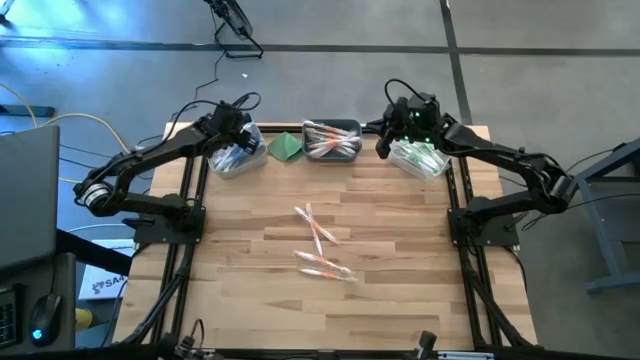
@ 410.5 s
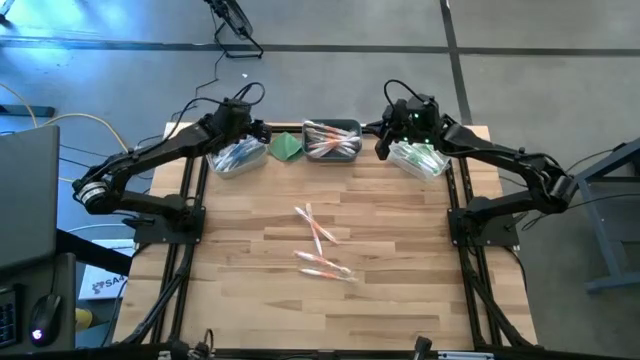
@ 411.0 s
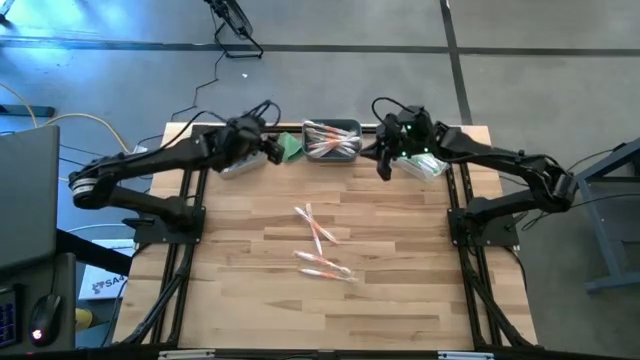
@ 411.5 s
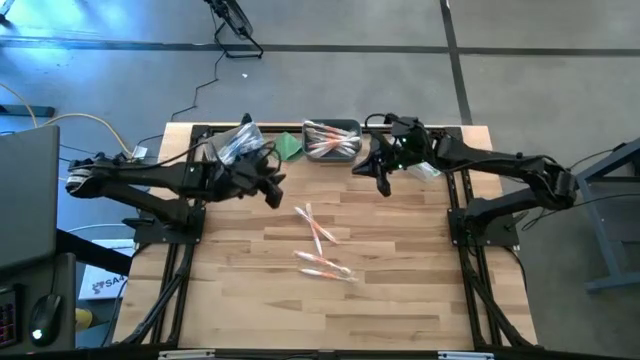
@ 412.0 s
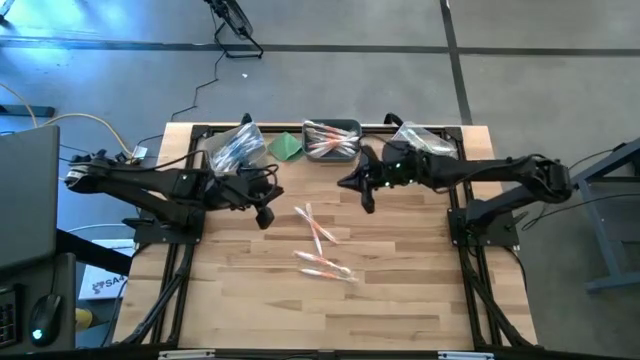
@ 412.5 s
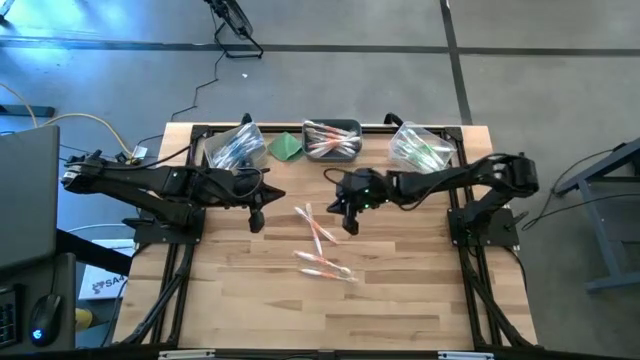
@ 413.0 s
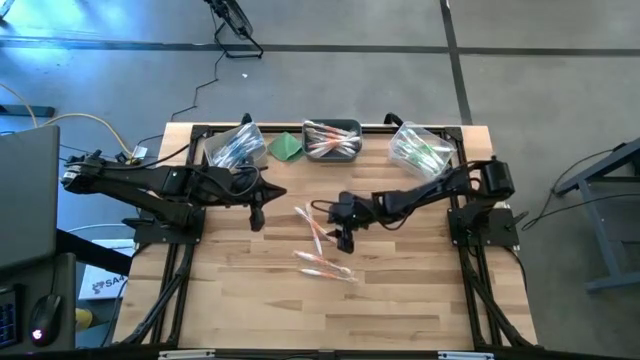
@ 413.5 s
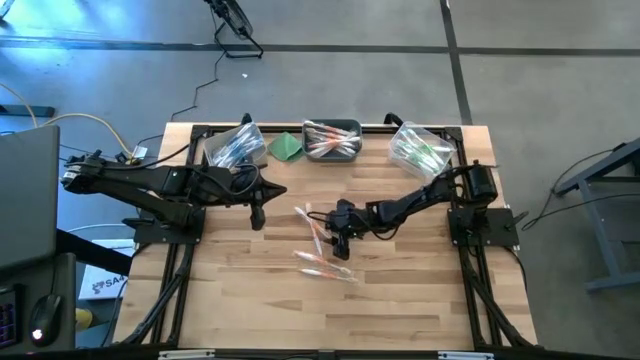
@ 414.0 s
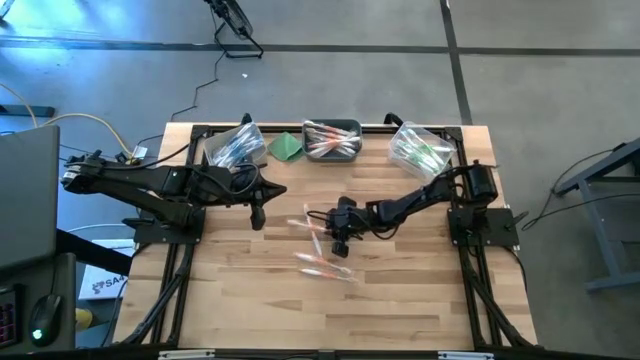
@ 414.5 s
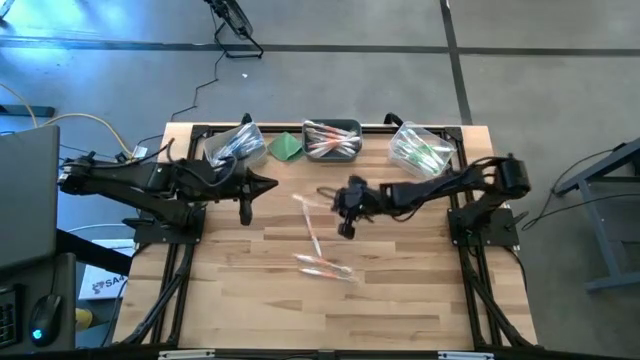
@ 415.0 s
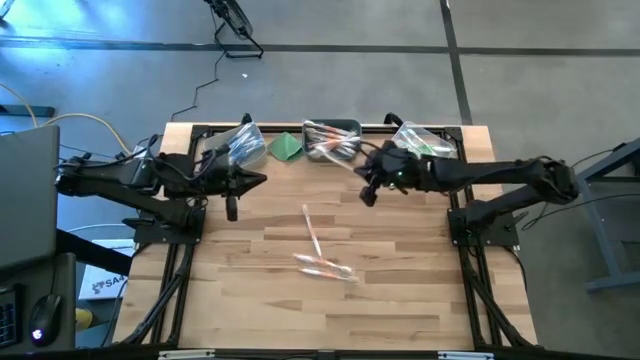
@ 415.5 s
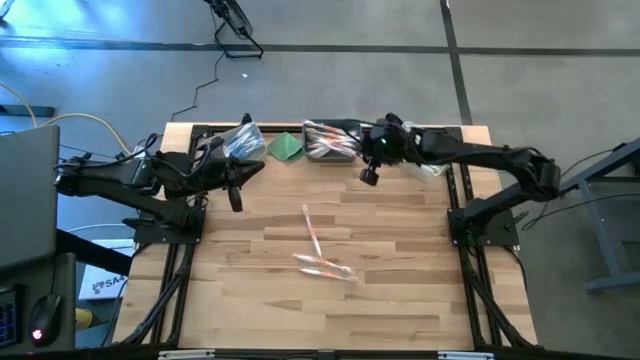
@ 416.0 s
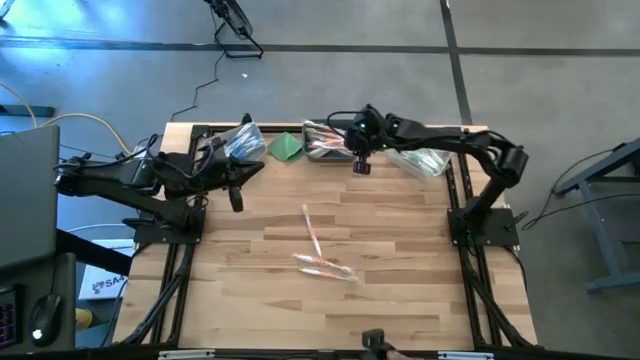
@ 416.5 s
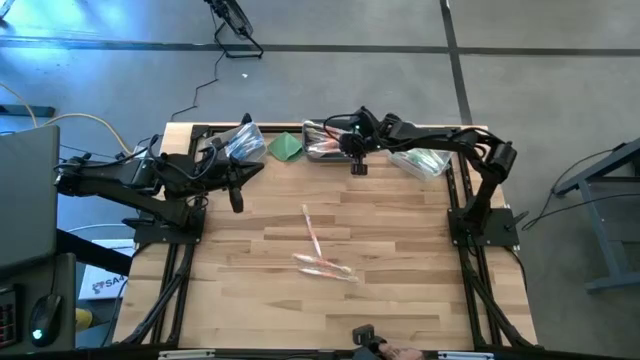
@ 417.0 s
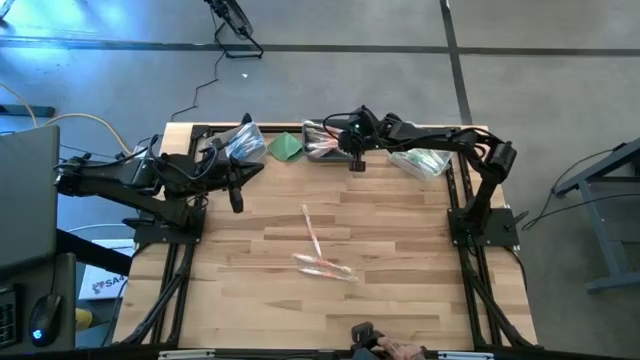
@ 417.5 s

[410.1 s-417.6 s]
Task: Pick & Place Toothbrushes
Put the orange toothbrush into the blue bin

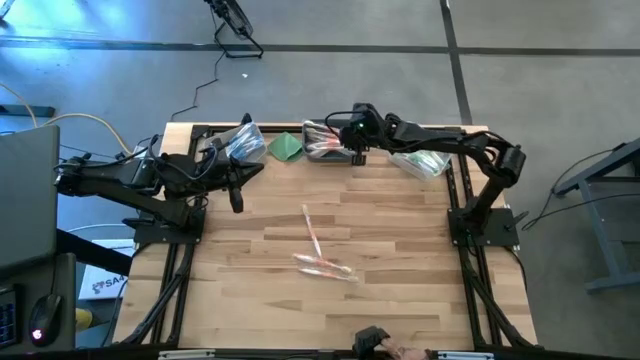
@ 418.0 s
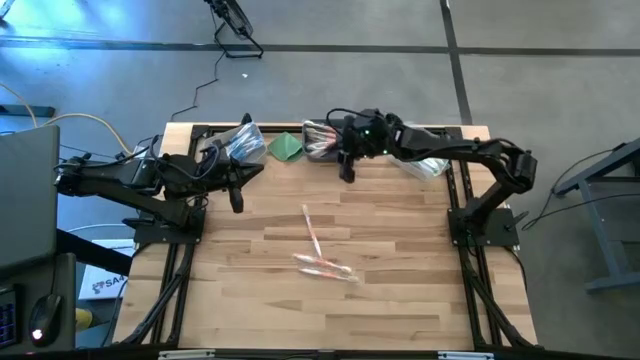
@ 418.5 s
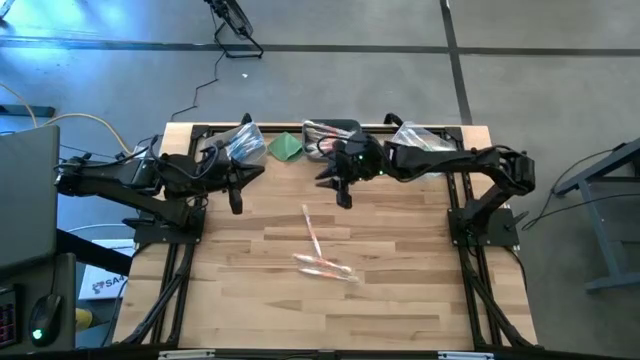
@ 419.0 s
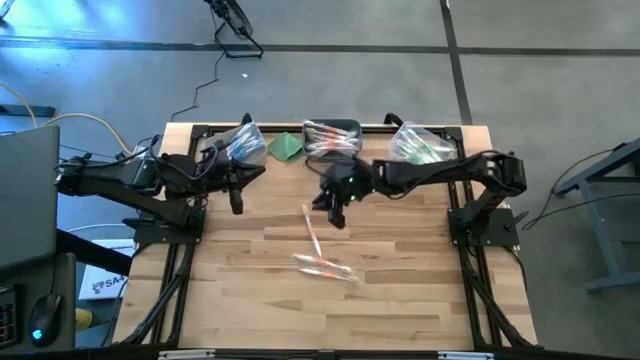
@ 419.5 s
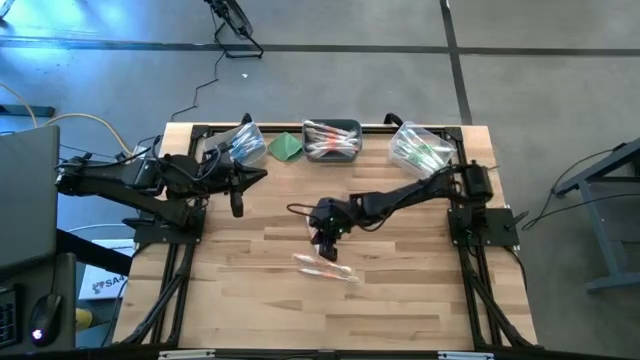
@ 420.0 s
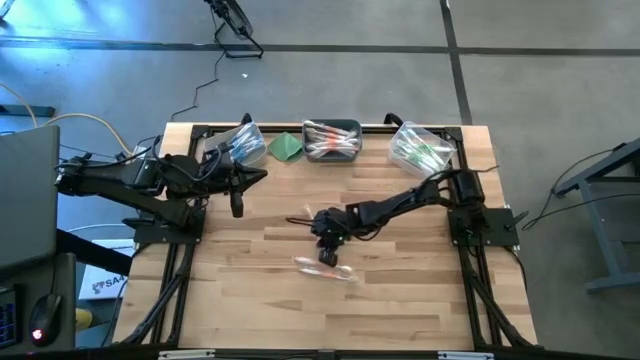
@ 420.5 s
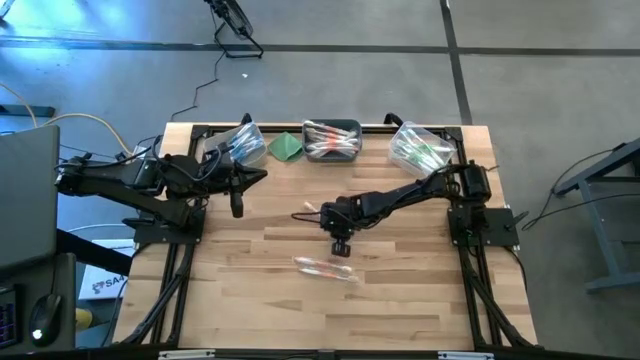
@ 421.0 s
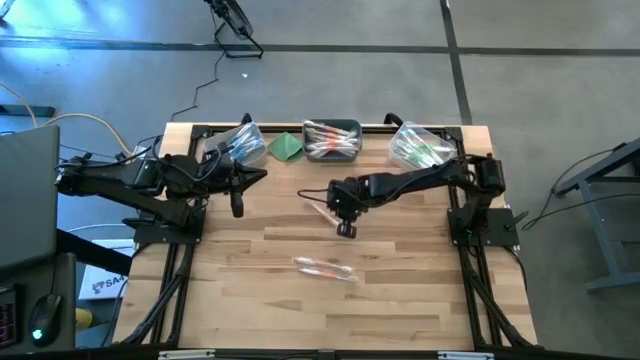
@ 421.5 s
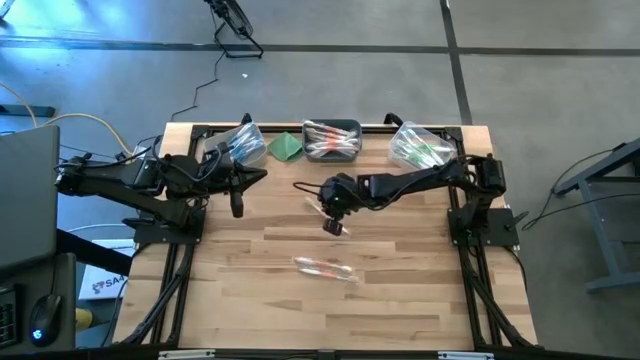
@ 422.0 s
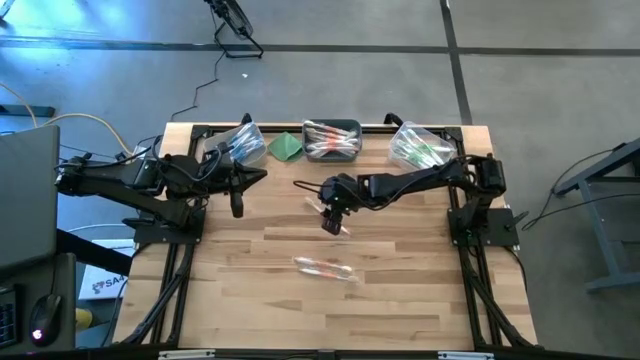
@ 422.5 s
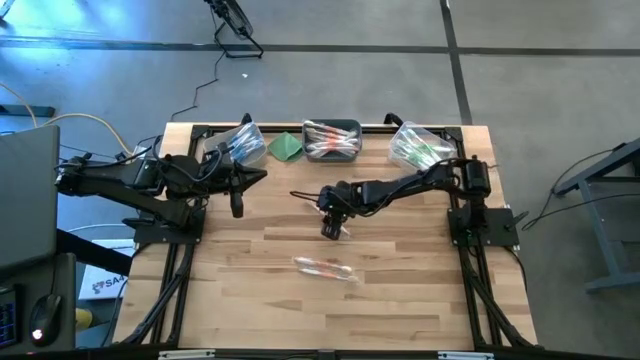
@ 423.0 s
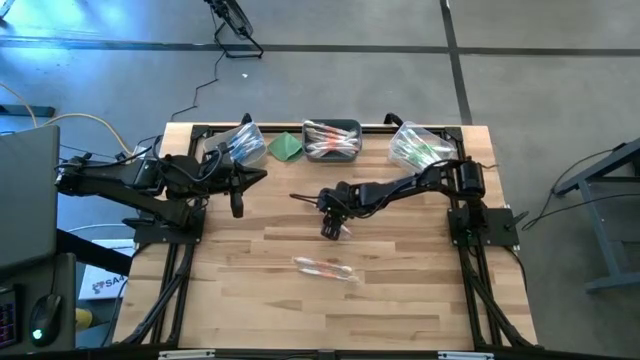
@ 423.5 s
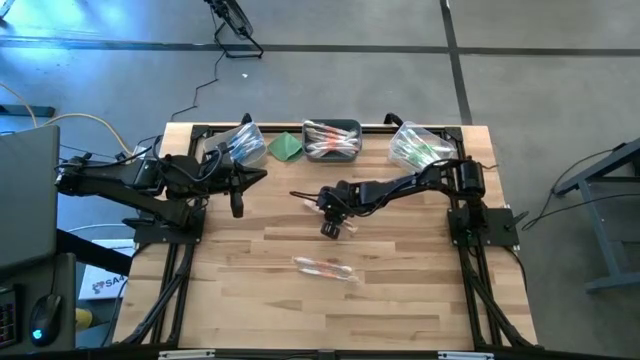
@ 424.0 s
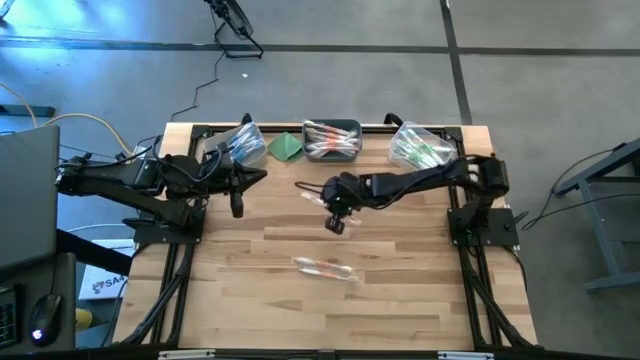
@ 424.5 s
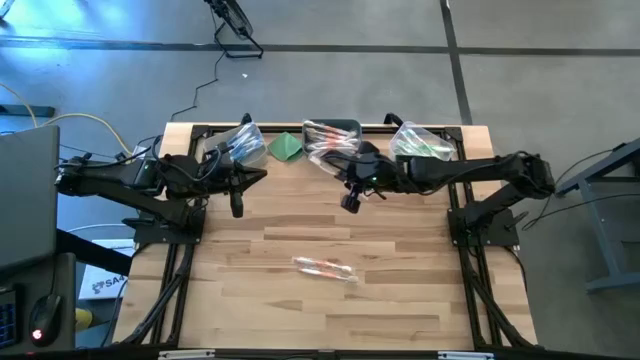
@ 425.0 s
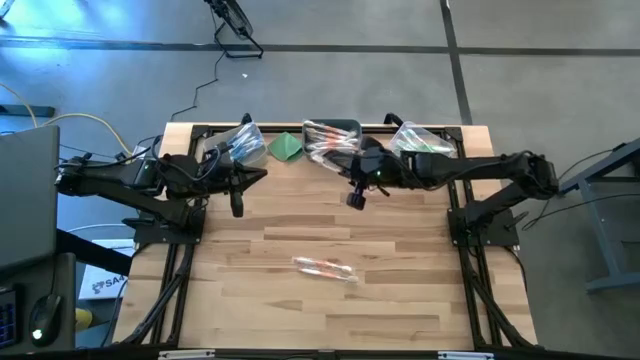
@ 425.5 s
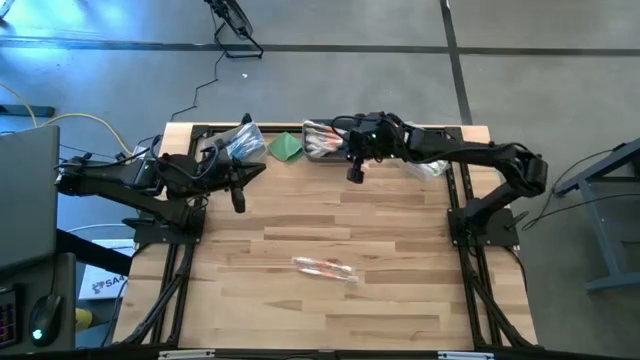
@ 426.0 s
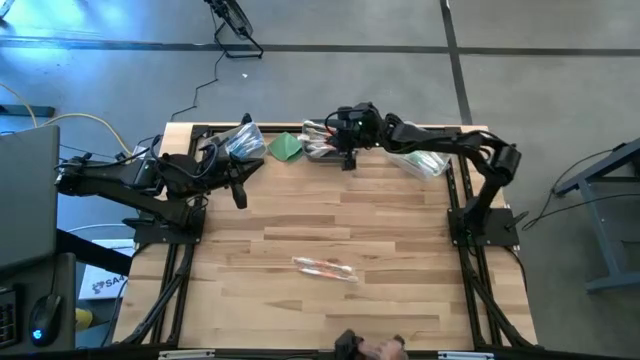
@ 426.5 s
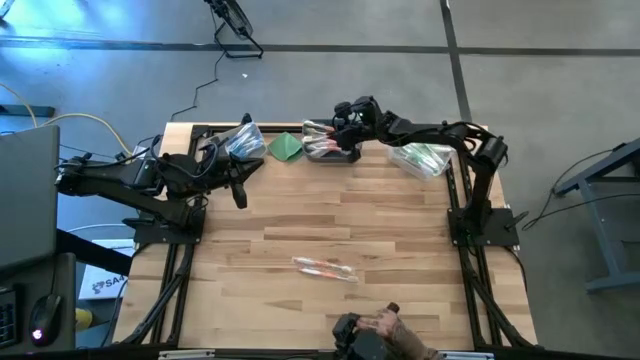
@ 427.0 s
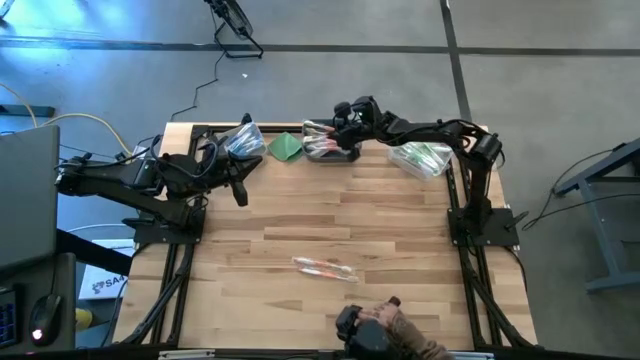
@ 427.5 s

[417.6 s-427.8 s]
Put the top orange toothbrush into the blue bin

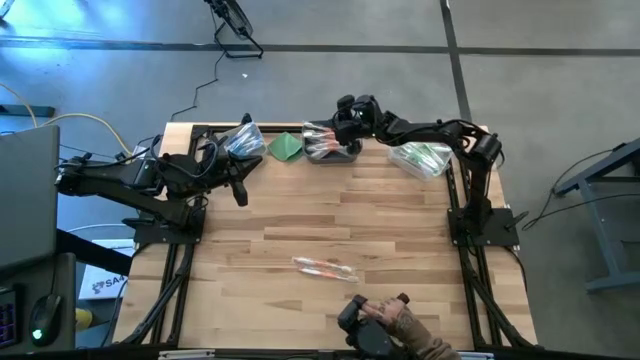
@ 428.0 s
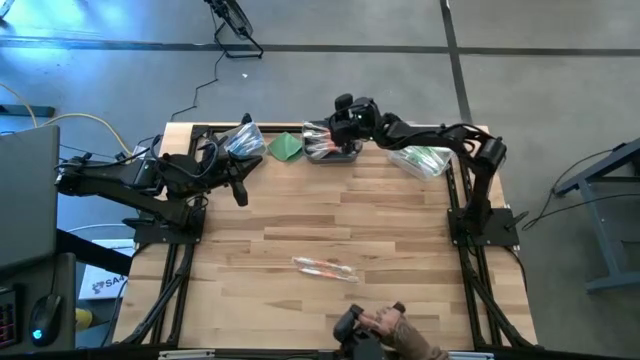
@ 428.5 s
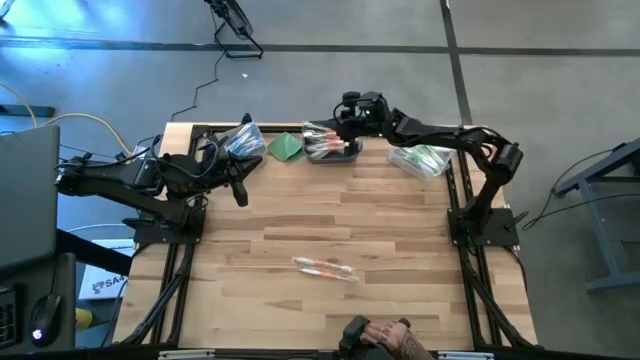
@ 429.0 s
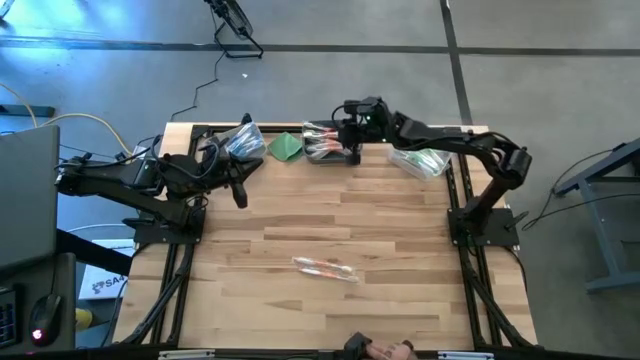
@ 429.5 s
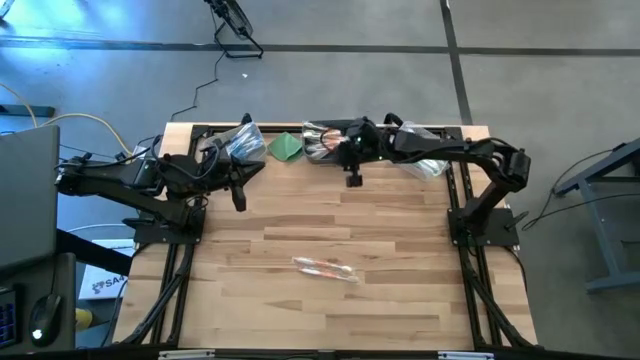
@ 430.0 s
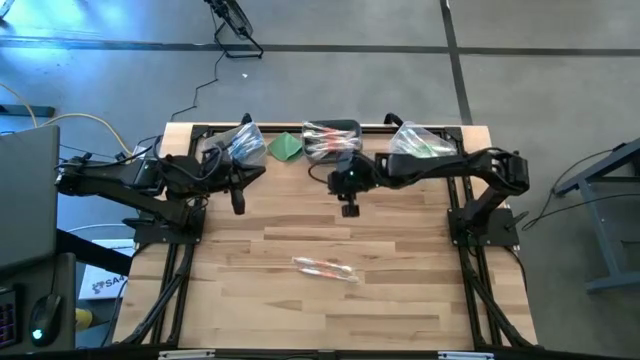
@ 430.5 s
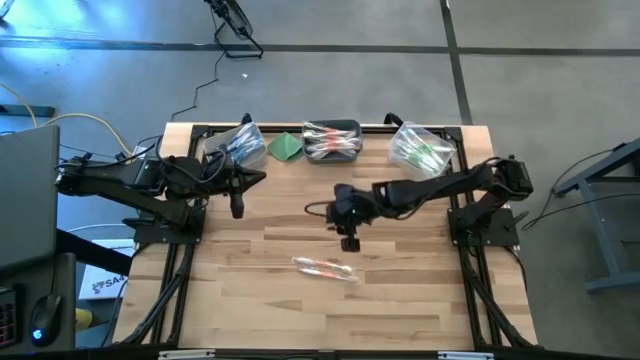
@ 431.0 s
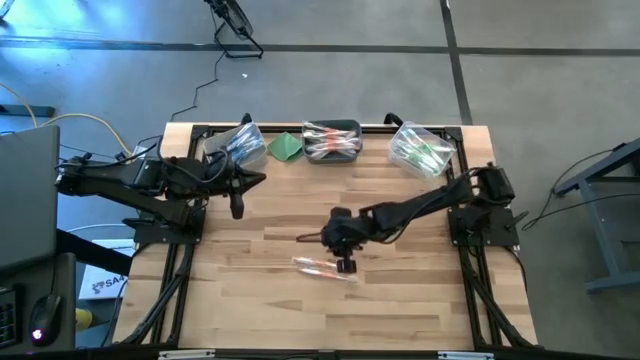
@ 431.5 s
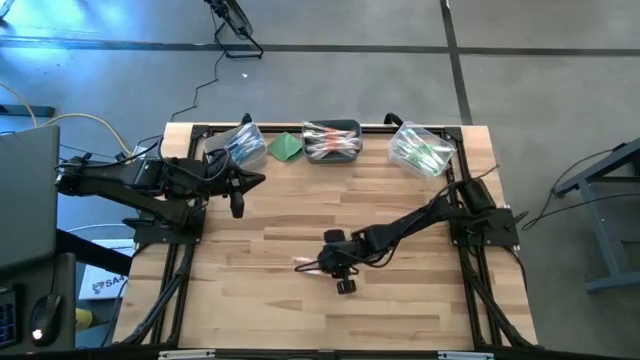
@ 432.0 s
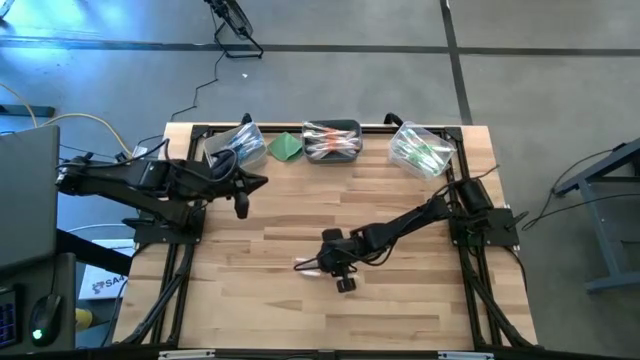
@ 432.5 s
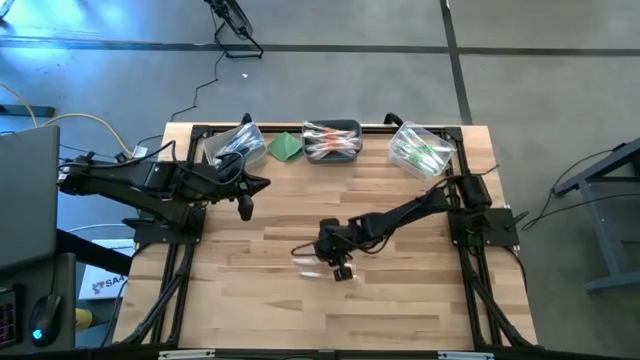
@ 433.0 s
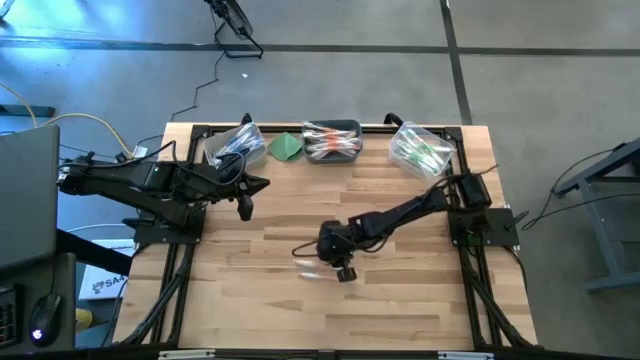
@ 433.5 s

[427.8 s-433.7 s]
Put the top orange toothbrush into the blue bin
